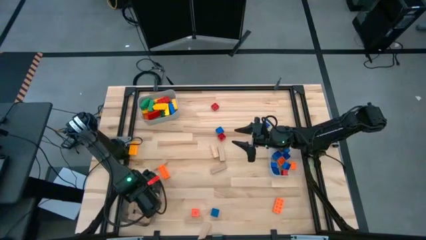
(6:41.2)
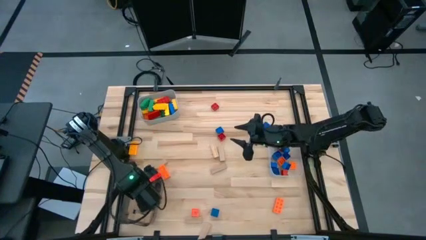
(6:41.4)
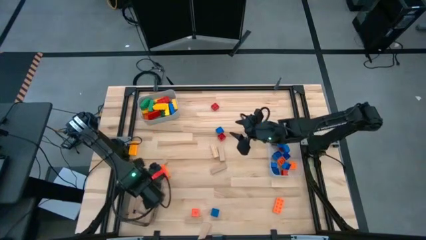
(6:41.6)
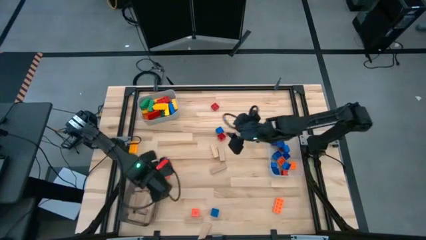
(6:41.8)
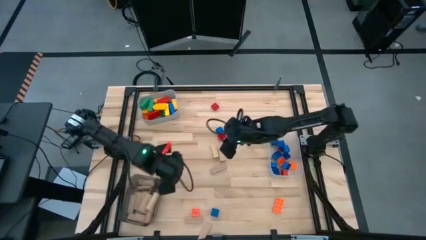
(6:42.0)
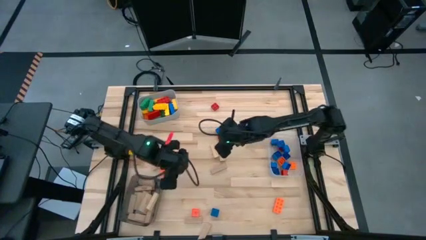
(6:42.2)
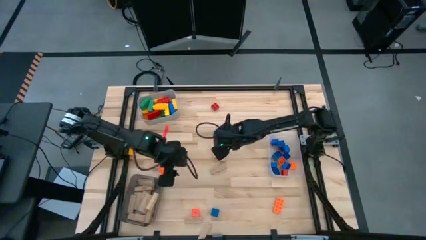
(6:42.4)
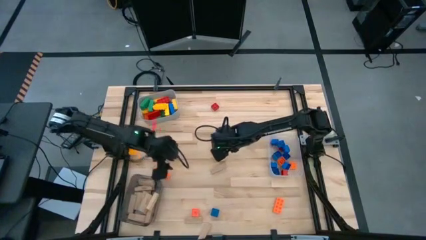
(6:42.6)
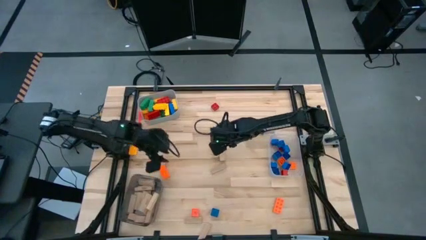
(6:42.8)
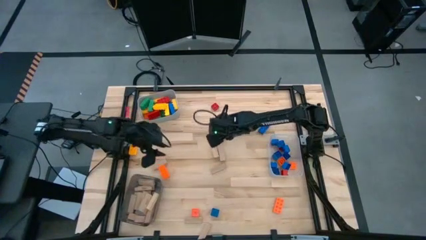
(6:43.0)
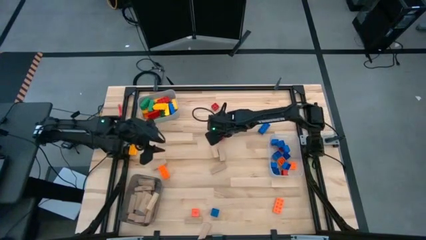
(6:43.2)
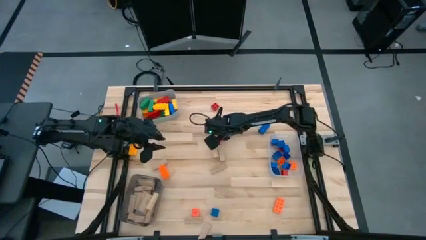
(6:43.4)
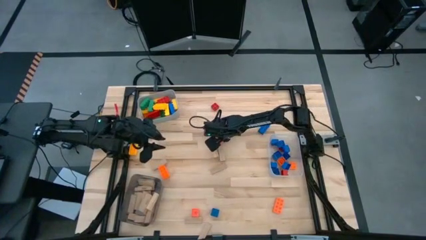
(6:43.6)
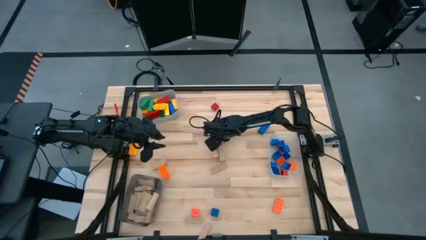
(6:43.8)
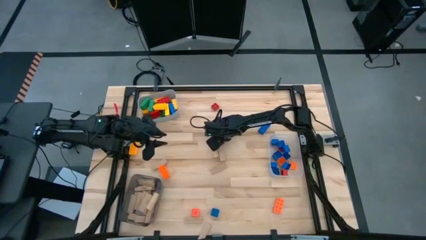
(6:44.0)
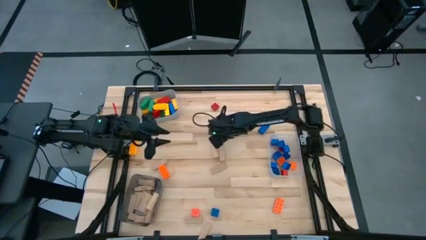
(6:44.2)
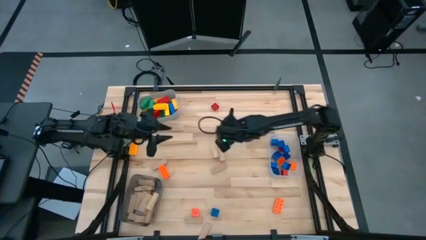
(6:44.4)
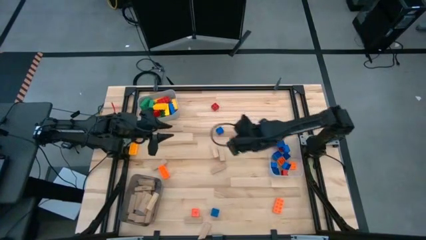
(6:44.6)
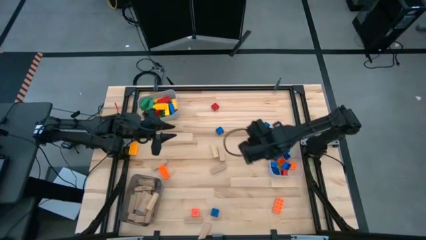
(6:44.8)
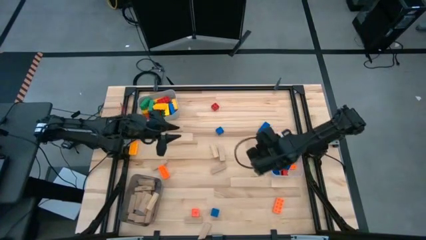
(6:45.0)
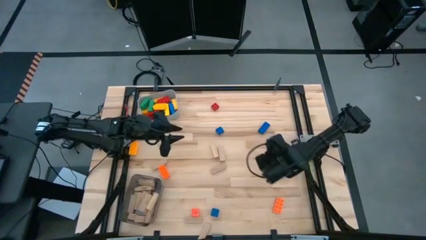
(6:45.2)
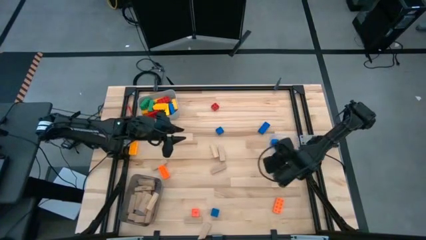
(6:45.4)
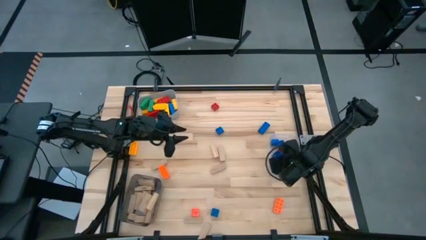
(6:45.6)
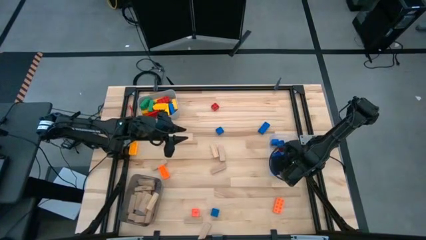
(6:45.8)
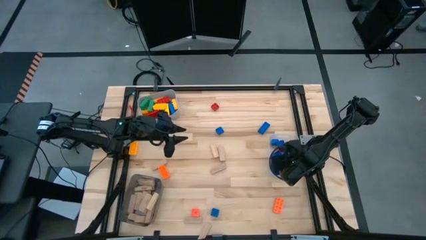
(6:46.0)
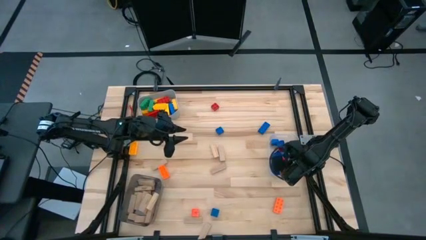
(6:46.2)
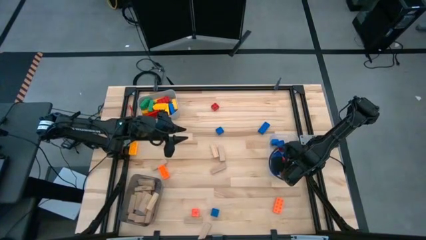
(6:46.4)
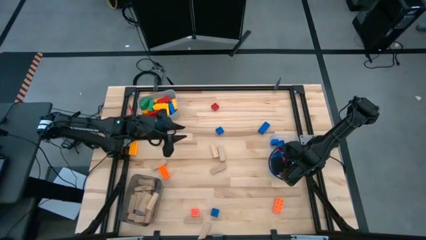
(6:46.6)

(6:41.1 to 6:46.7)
Task: Sort blocks by size
Put the small red game piece into the transparent bin

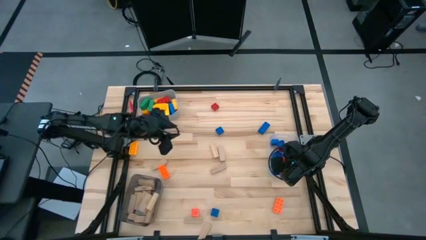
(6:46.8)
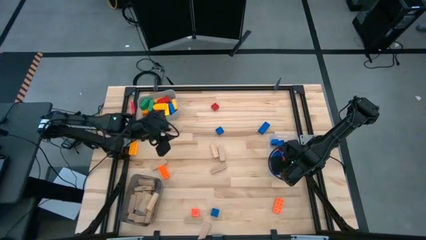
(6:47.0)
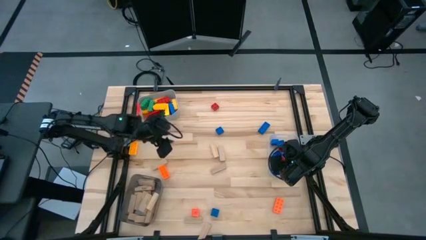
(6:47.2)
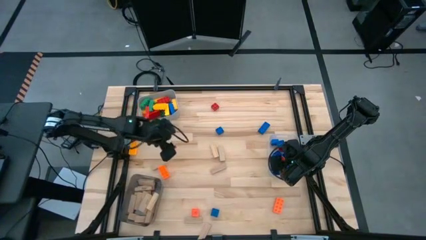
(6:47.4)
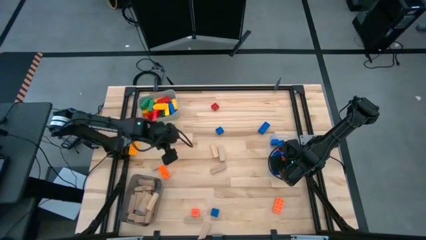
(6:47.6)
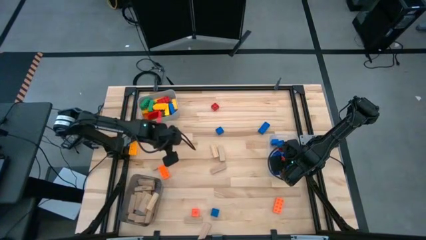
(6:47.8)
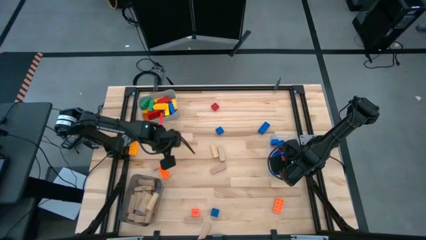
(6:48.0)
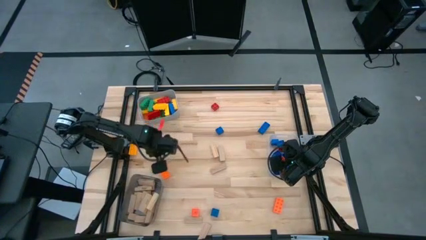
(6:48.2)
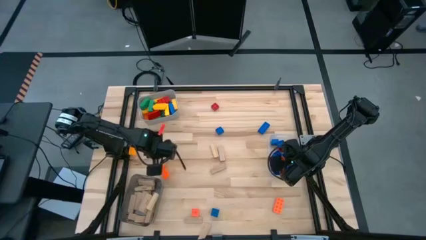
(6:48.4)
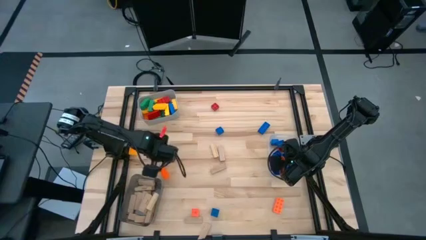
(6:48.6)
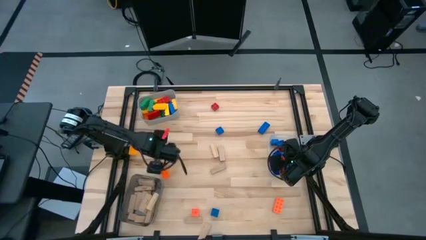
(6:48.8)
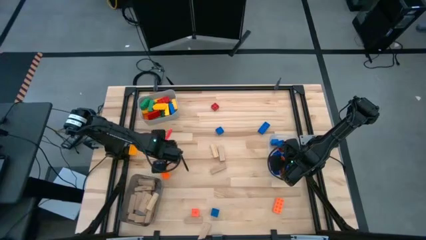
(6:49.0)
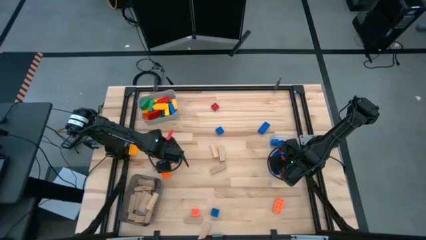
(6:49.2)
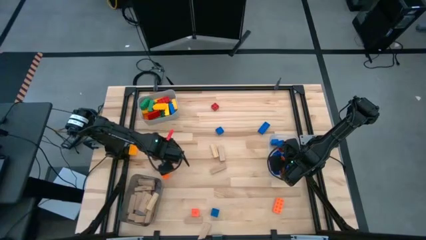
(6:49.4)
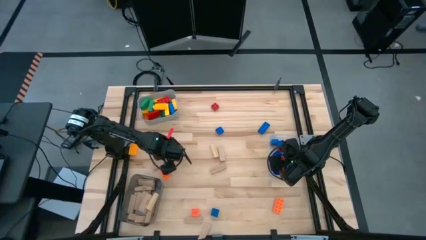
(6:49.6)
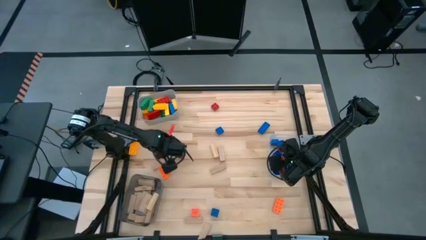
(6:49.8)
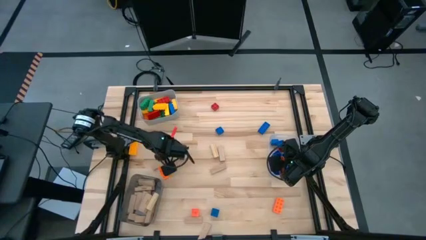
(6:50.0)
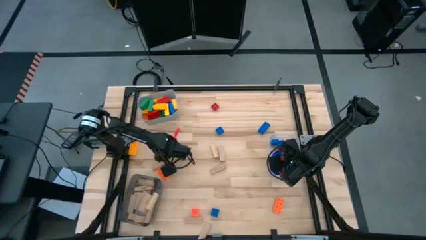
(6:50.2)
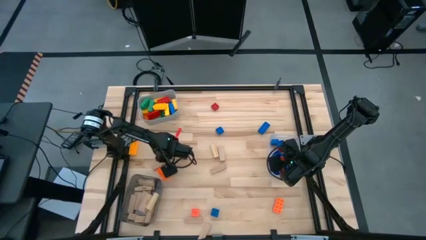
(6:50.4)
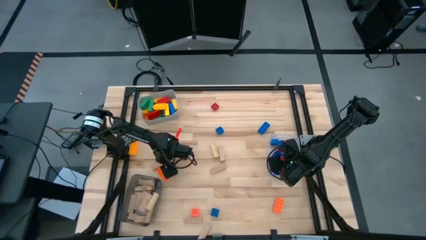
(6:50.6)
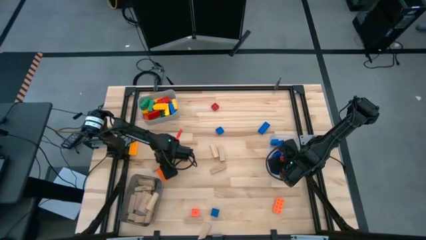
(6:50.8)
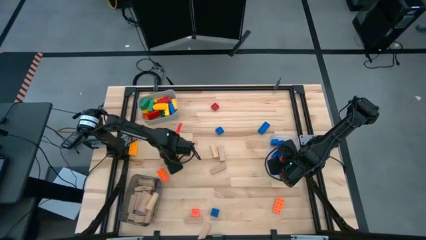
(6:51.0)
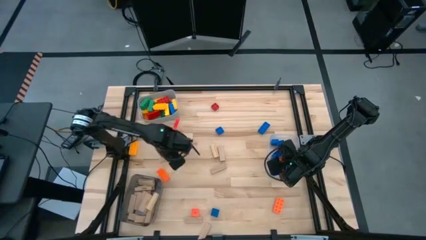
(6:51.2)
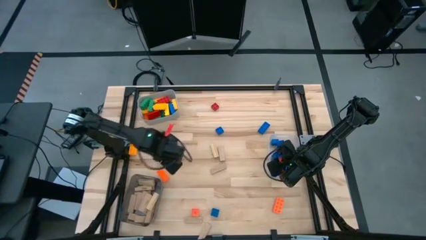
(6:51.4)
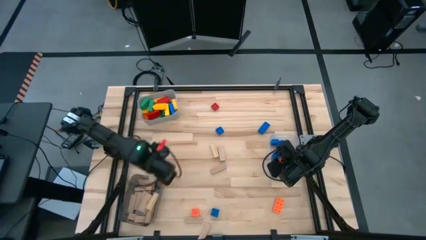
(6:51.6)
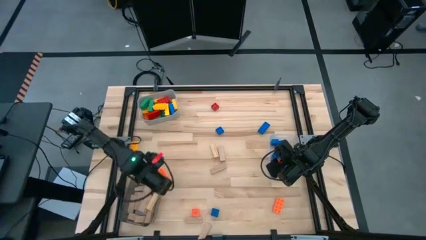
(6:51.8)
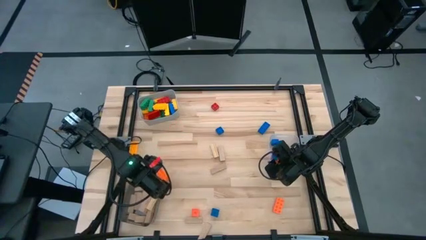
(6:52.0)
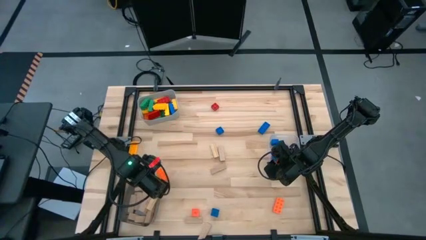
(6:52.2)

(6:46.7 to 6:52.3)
Put the brown block into the black bin

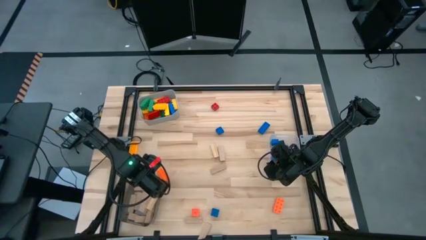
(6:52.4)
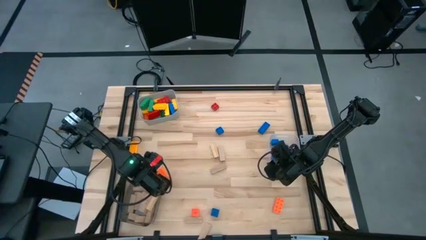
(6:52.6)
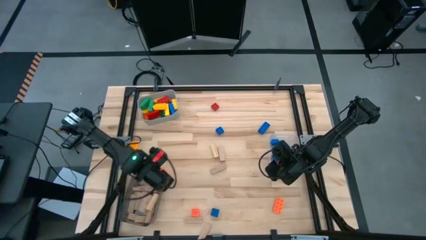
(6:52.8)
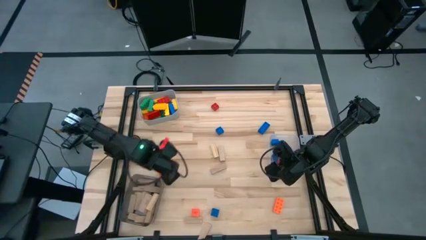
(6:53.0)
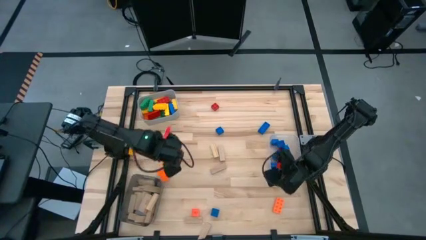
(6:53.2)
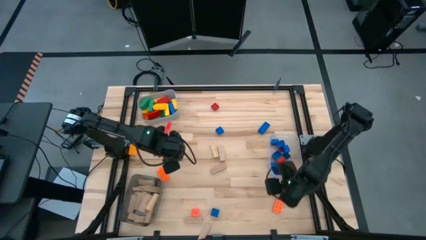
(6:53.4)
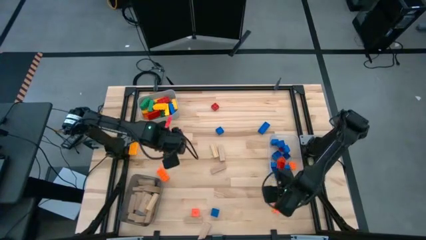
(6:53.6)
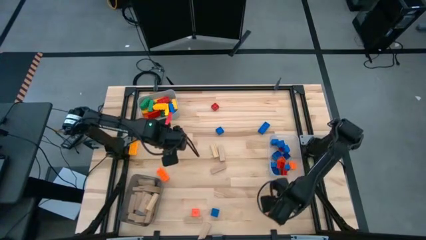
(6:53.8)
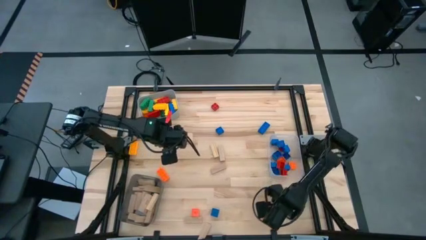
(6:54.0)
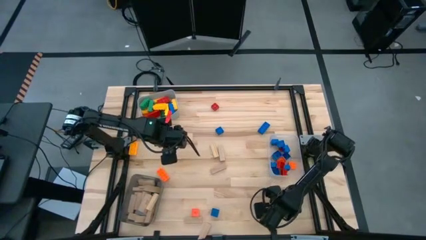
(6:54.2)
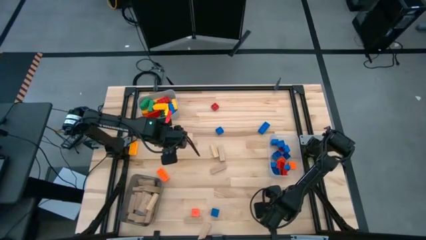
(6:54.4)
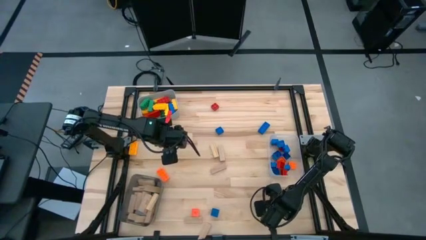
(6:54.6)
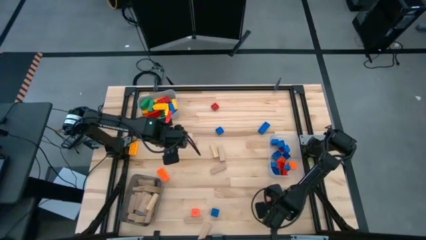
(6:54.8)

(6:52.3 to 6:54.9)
Put the large orange game piece into the gray bin
